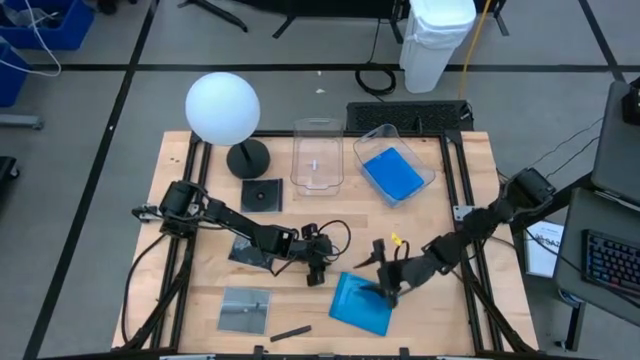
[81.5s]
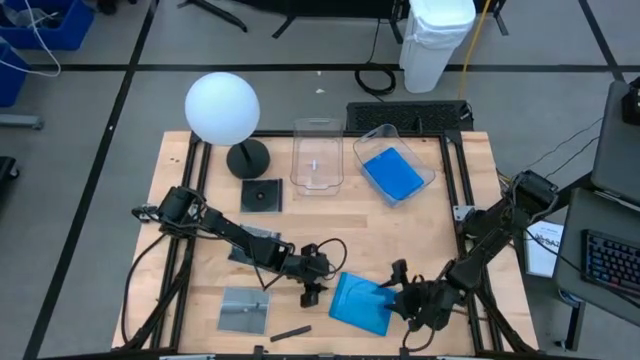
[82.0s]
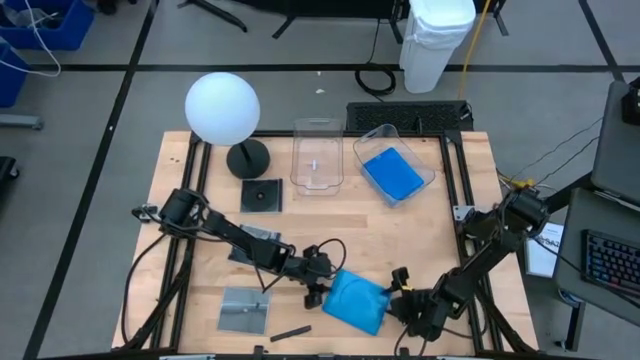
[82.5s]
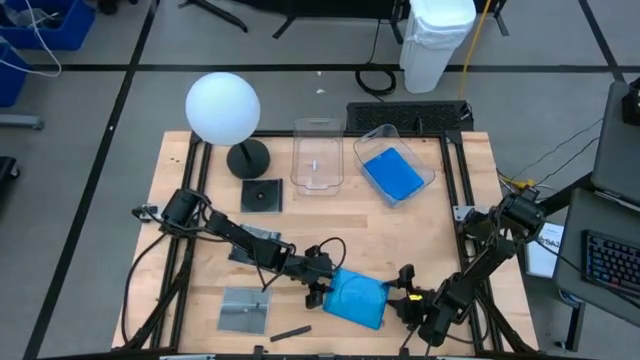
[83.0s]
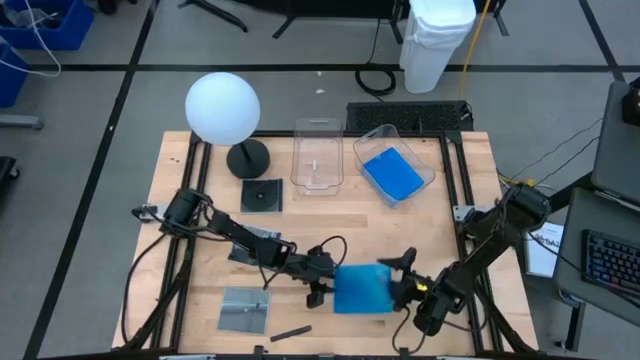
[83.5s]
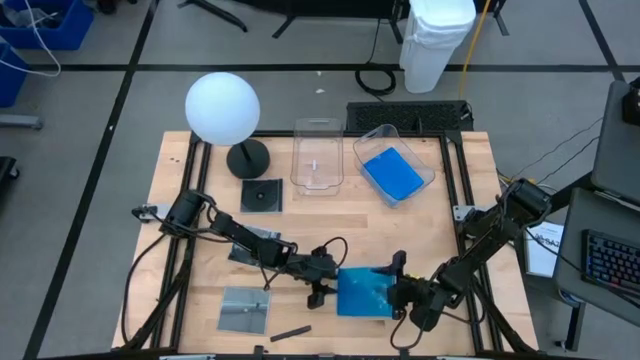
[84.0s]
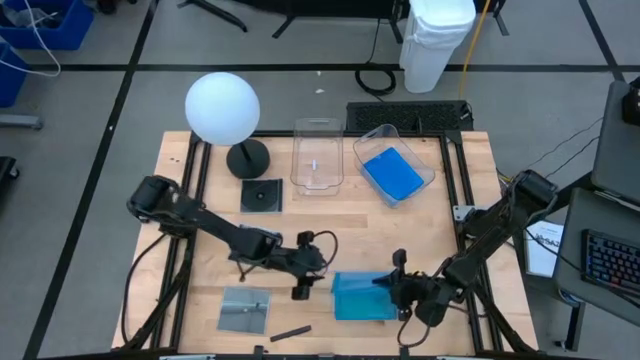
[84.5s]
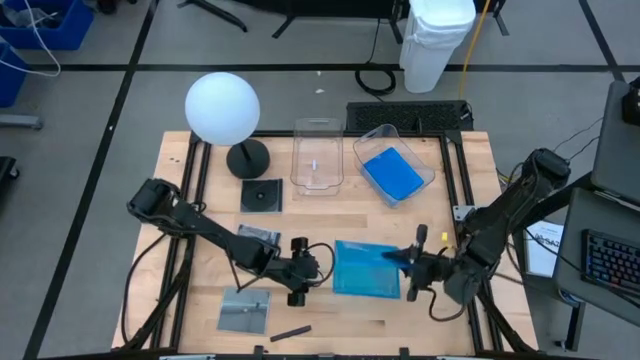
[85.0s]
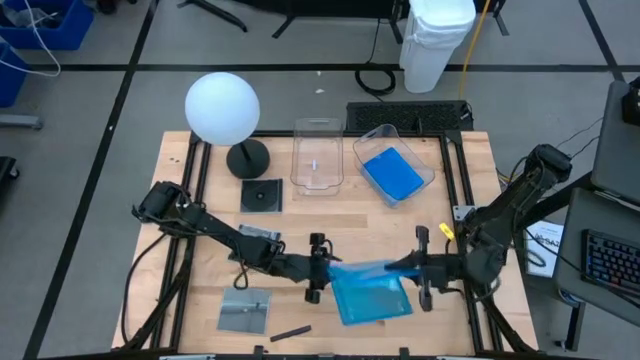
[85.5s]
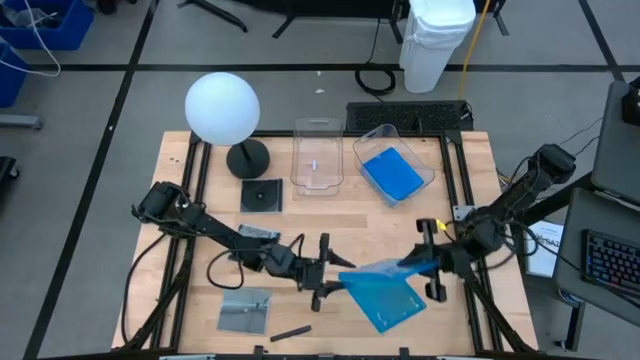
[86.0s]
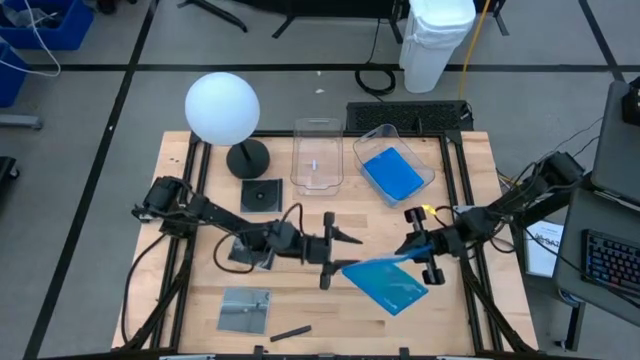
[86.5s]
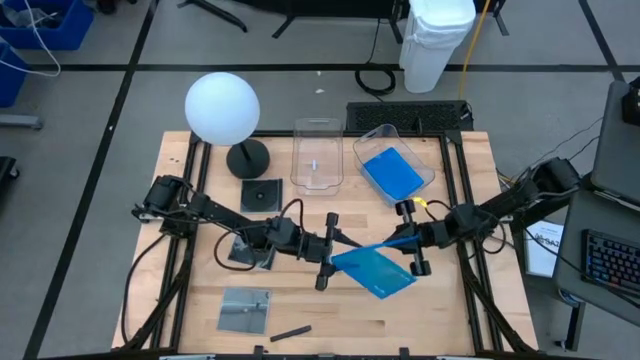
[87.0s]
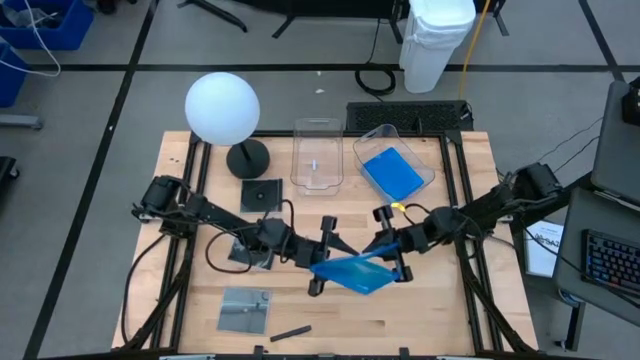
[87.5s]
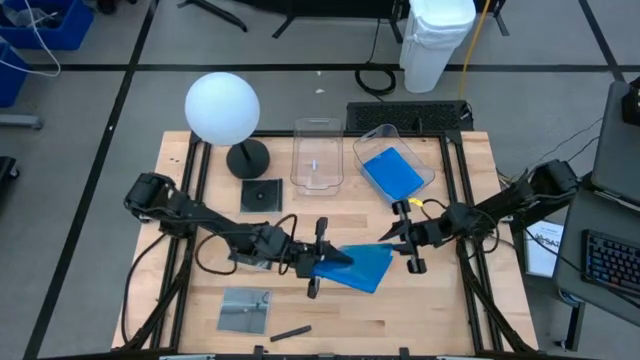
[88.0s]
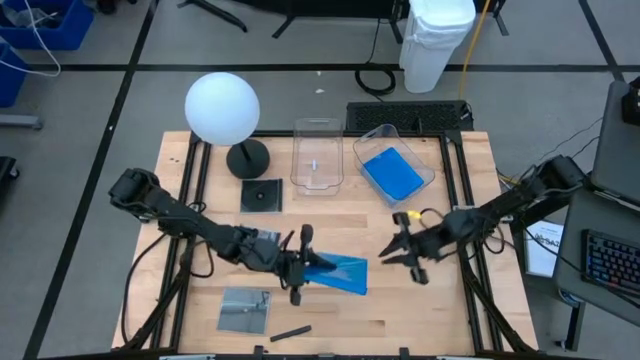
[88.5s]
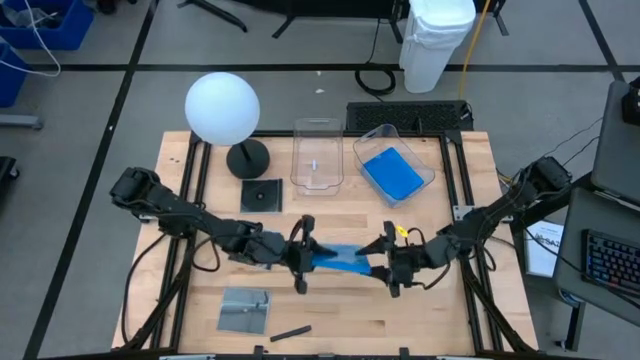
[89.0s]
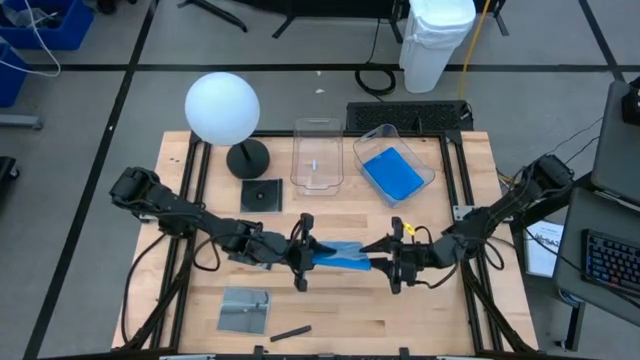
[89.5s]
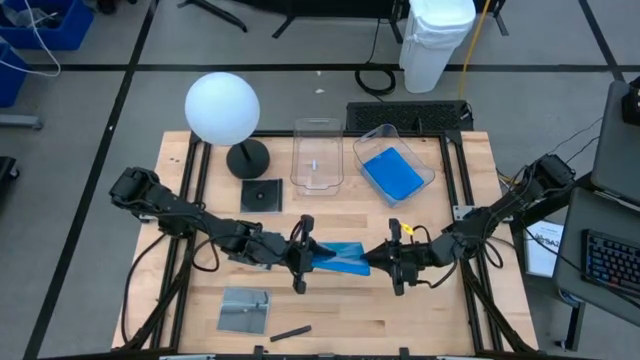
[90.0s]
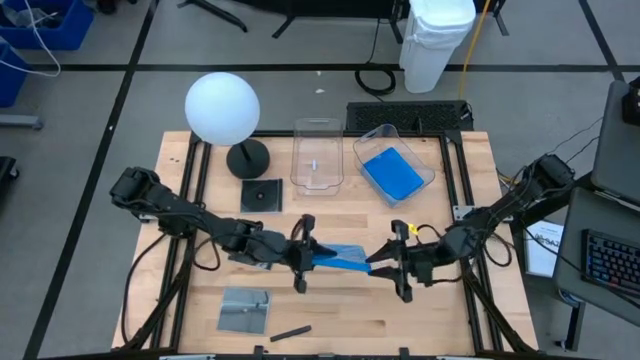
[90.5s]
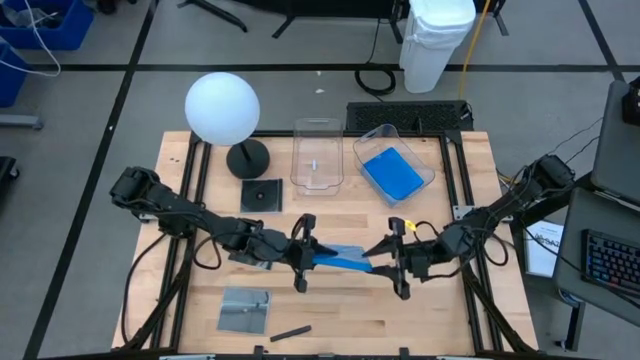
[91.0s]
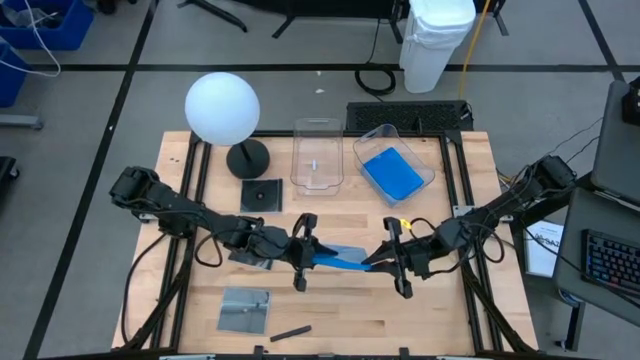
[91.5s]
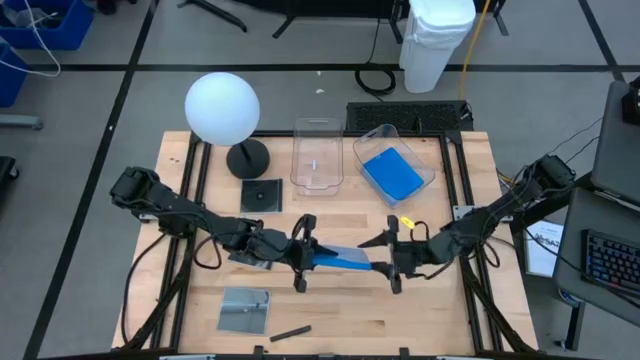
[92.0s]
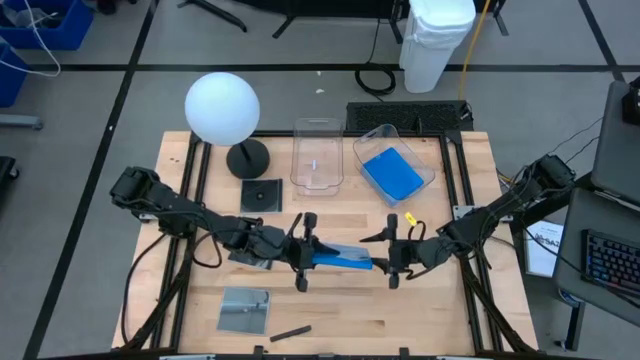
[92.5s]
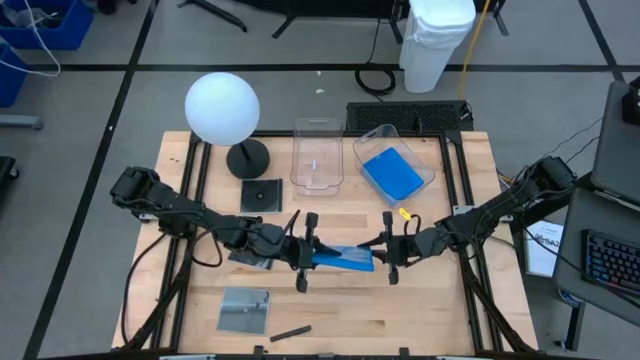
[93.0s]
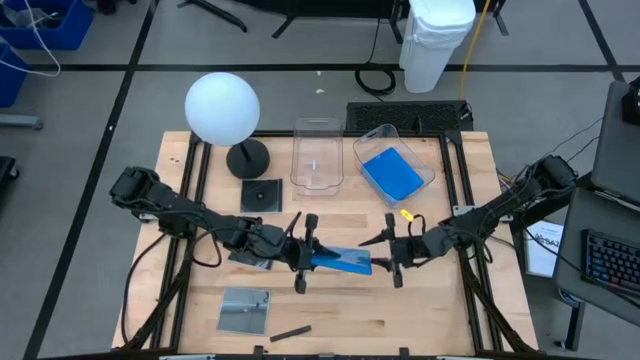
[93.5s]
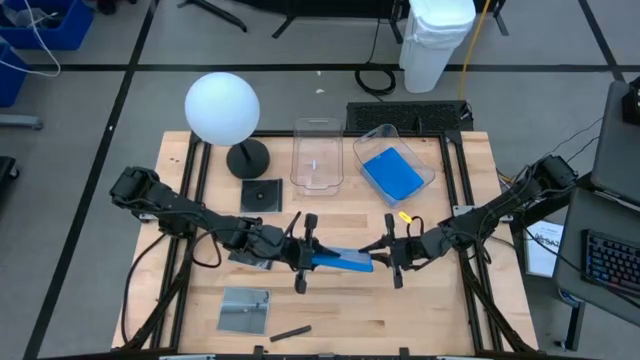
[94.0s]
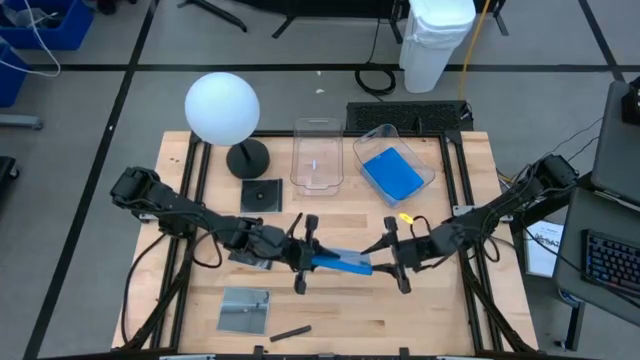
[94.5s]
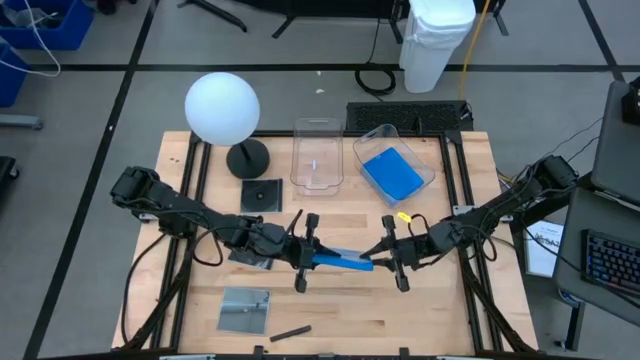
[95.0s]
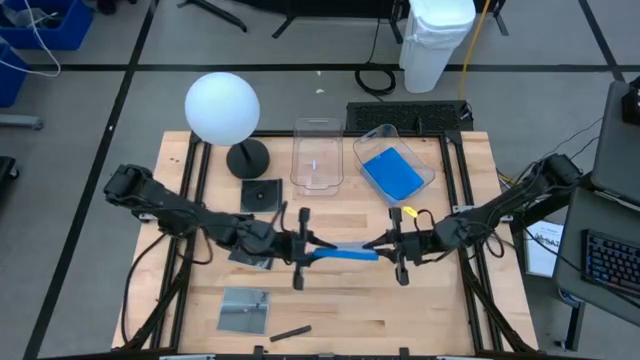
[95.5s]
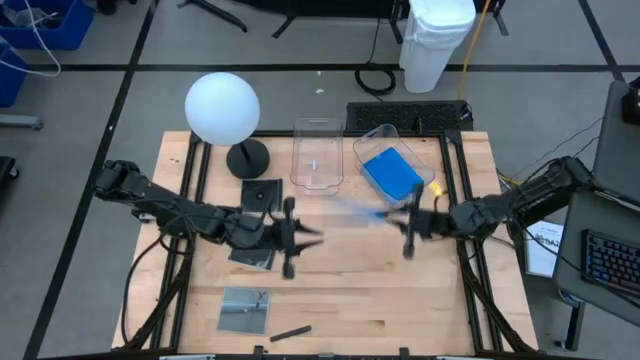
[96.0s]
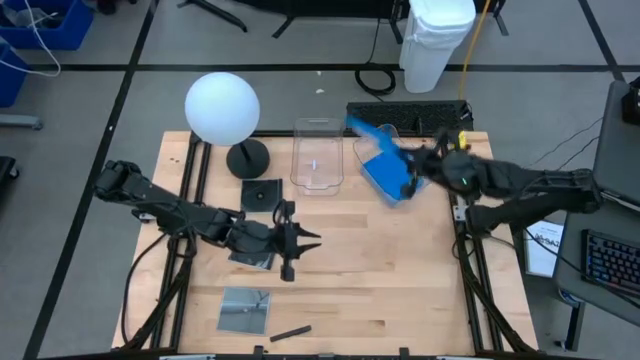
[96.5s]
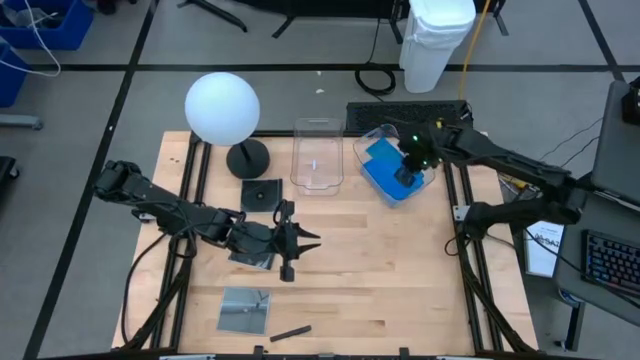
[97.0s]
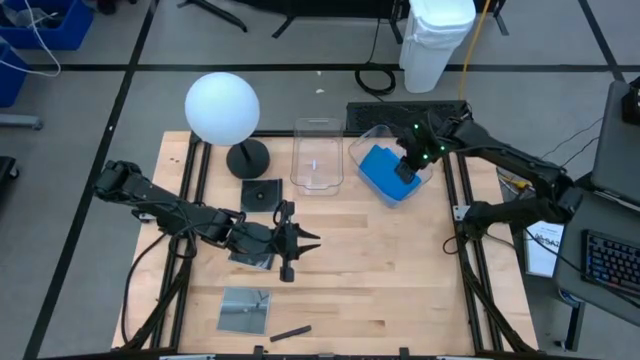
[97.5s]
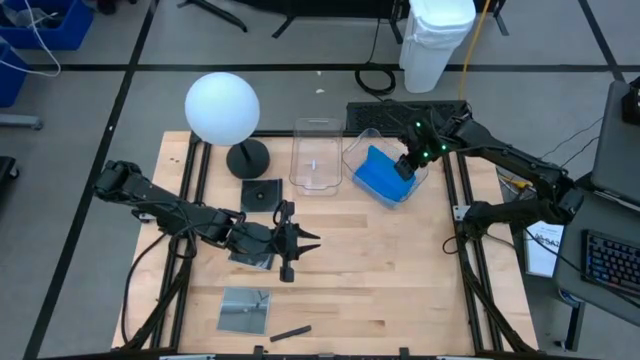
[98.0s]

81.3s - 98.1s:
Task: Pick & place jewel cases by type
Put the blue CD case into the right transparent bin

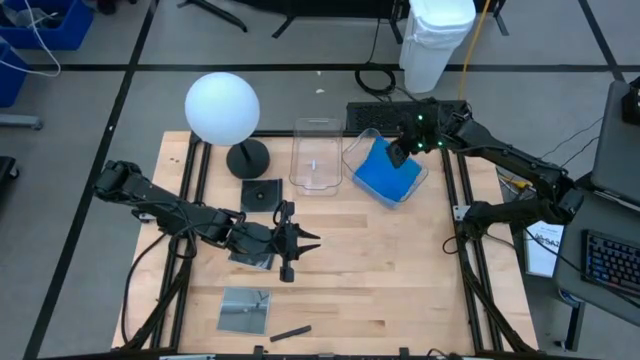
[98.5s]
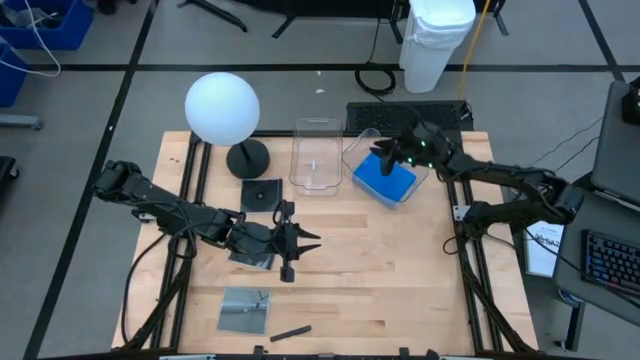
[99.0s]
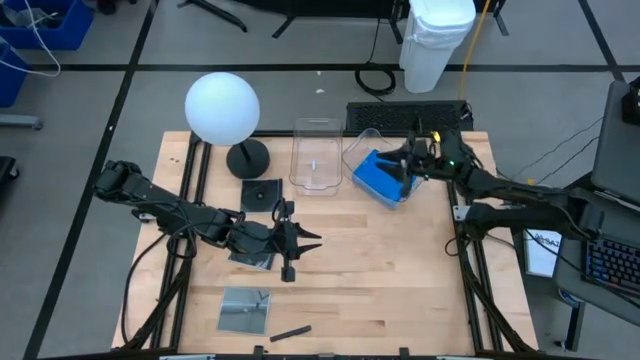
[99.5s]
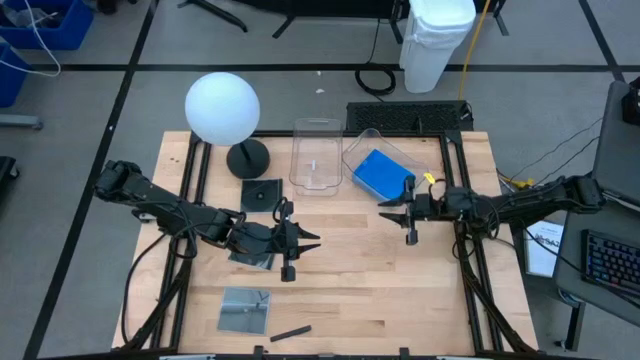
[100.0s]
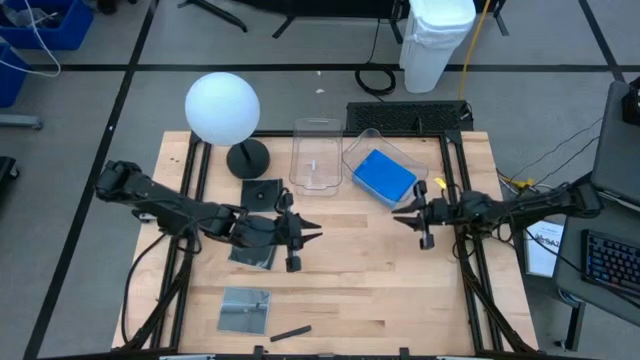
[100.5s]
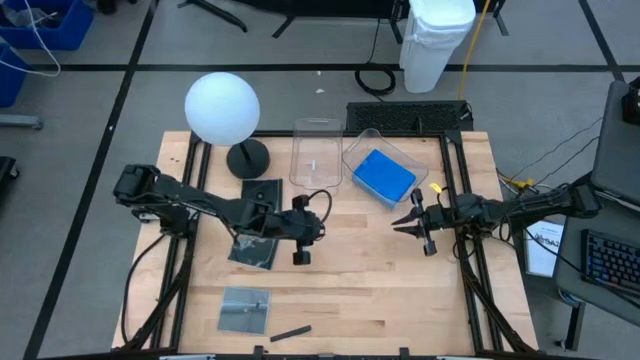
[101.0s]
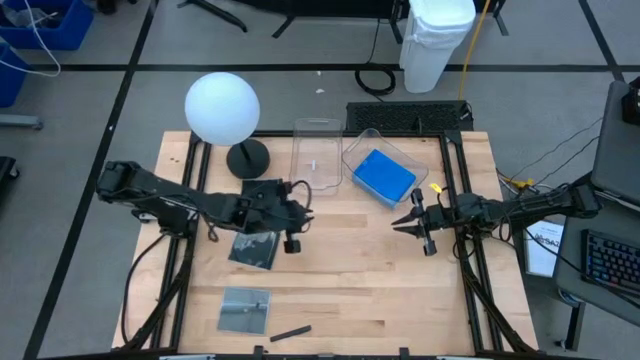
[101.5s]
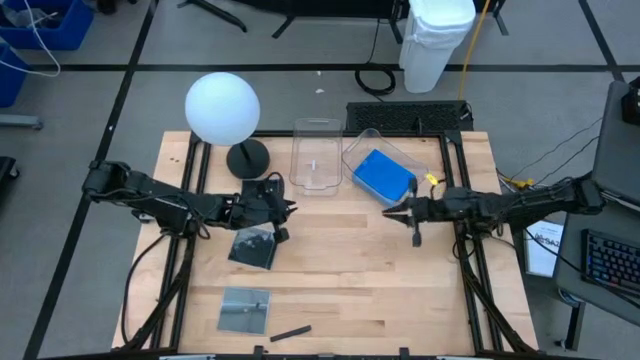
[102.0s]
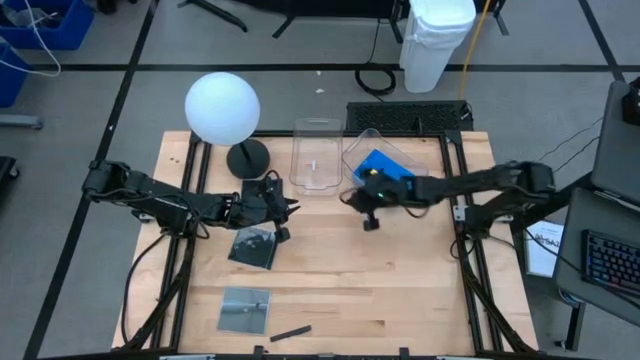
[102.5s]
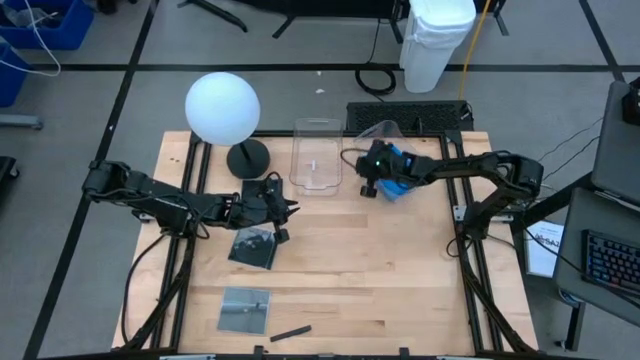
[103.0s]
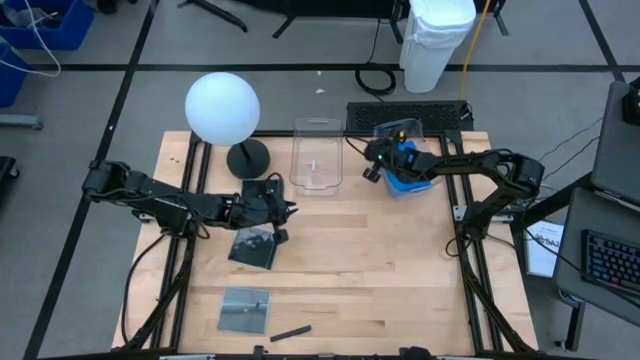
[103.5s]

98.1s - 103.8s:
Adjust the right transparent bin on the table
